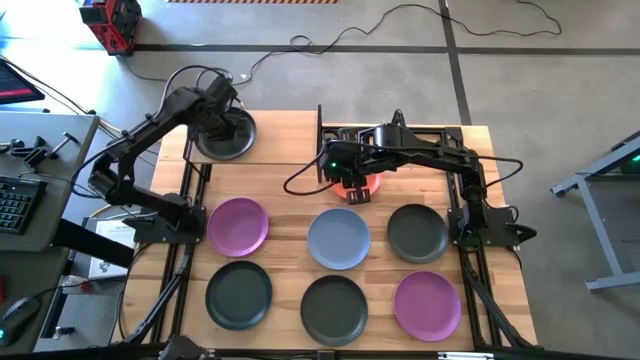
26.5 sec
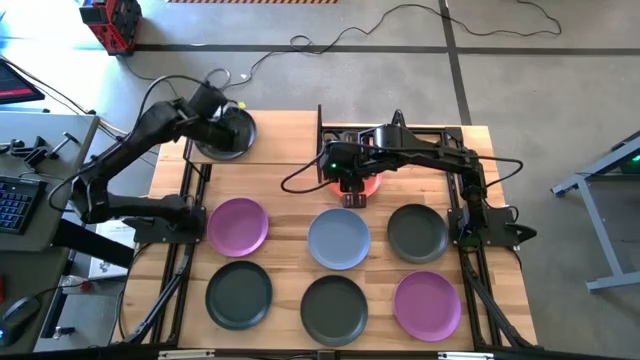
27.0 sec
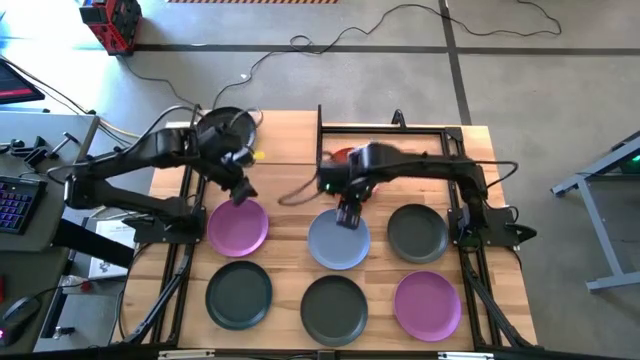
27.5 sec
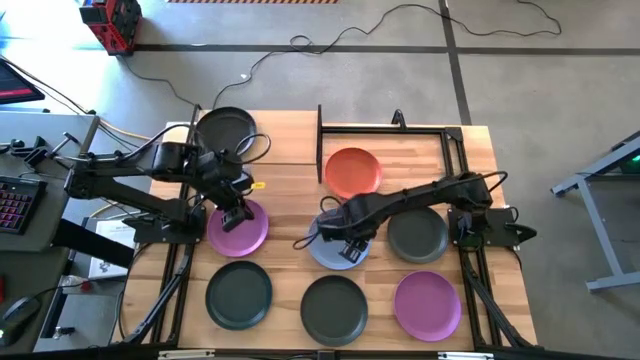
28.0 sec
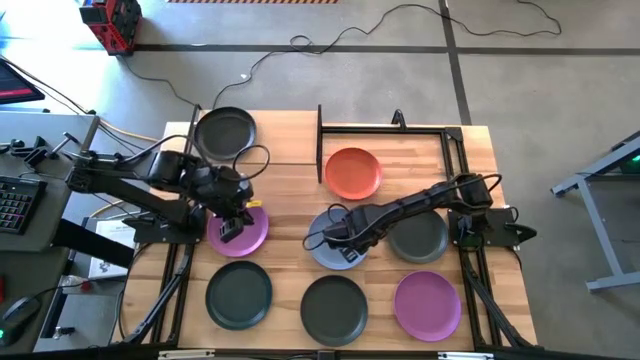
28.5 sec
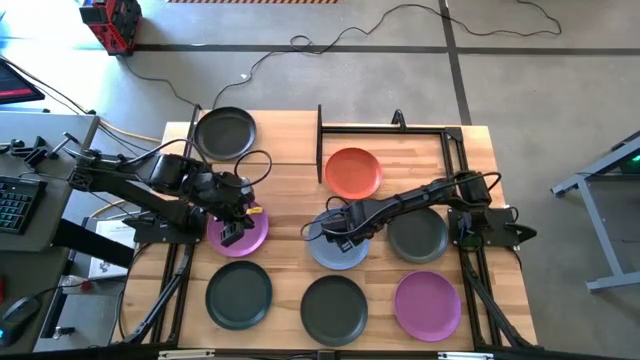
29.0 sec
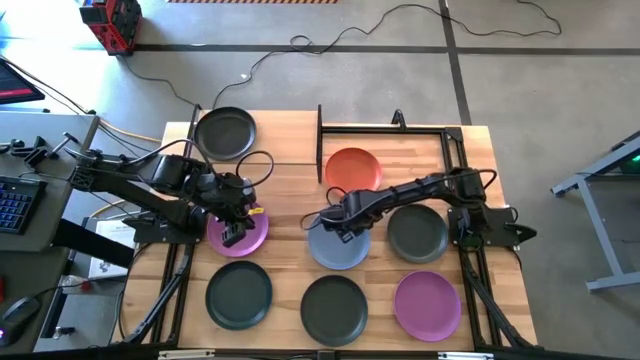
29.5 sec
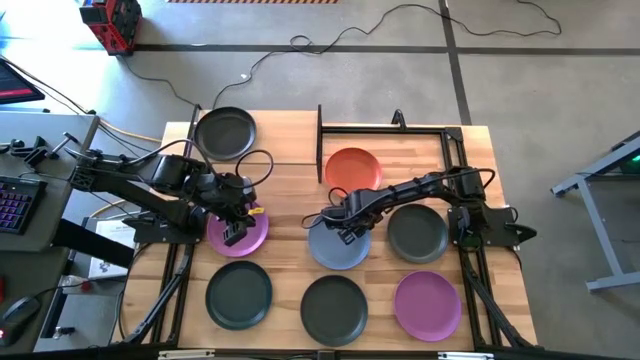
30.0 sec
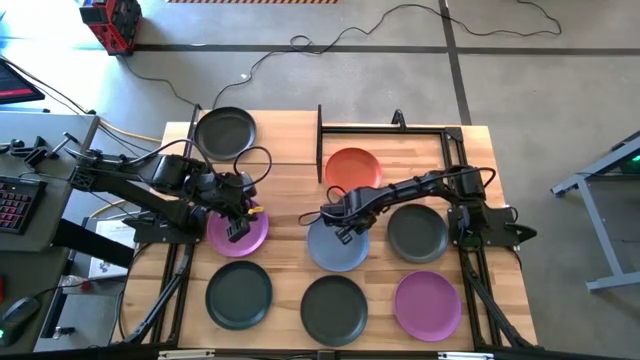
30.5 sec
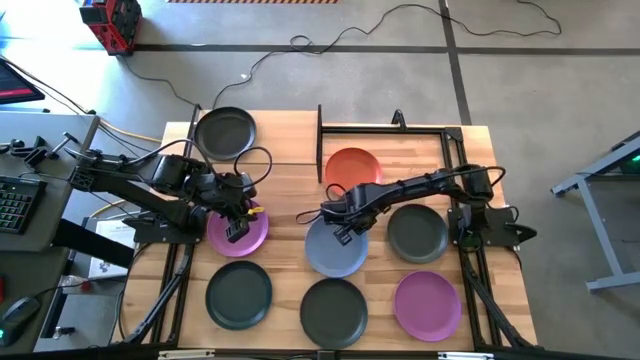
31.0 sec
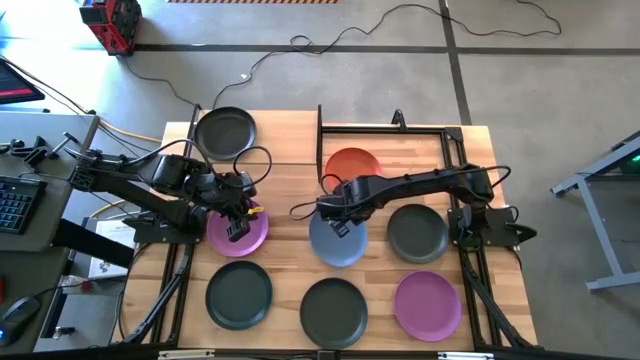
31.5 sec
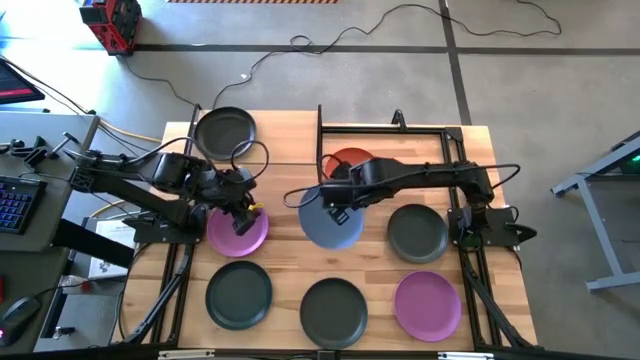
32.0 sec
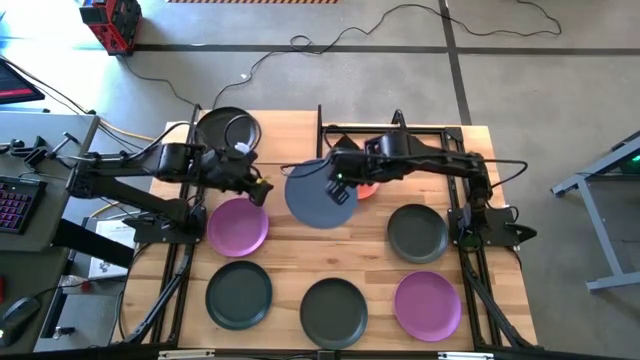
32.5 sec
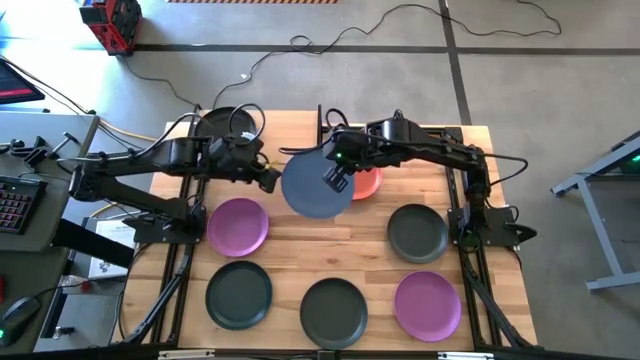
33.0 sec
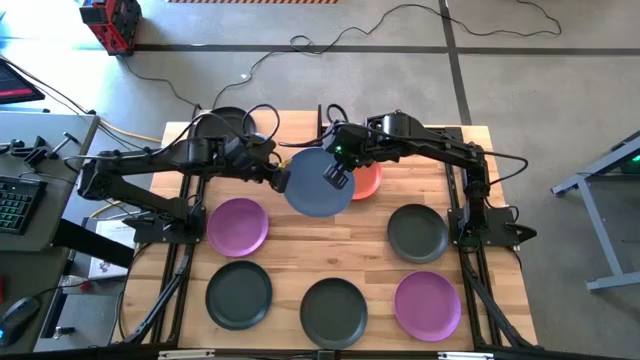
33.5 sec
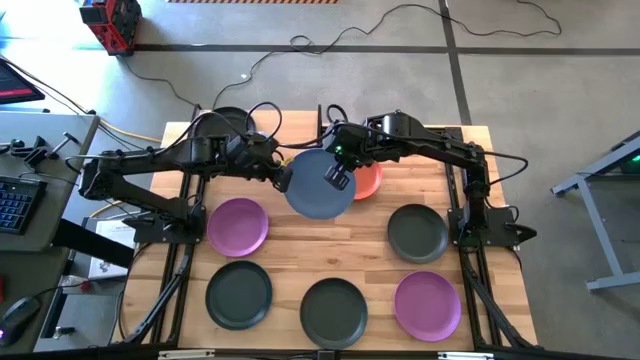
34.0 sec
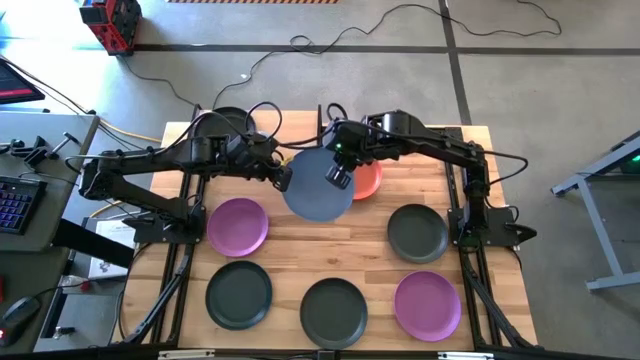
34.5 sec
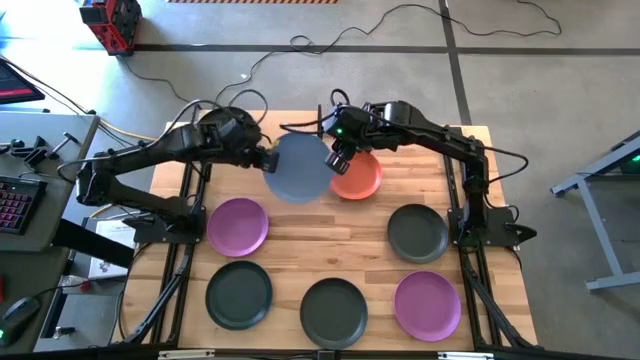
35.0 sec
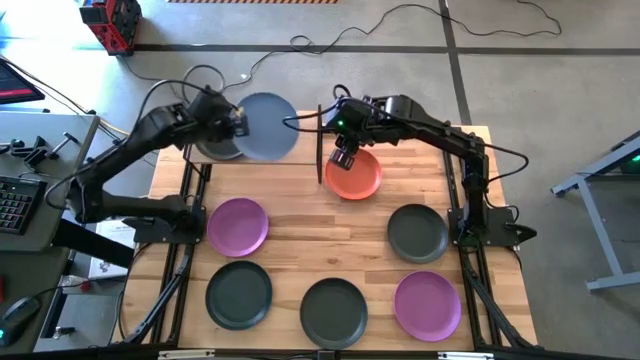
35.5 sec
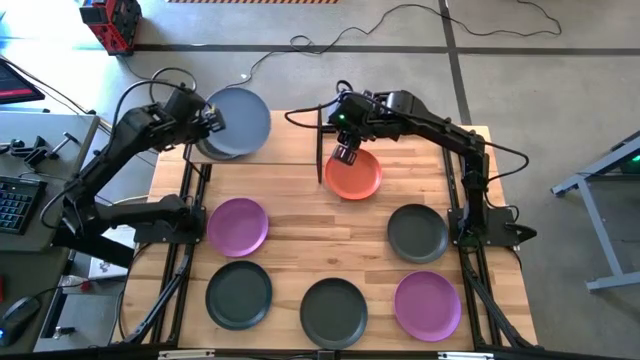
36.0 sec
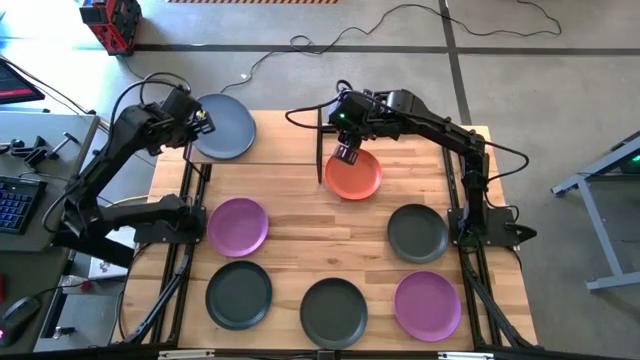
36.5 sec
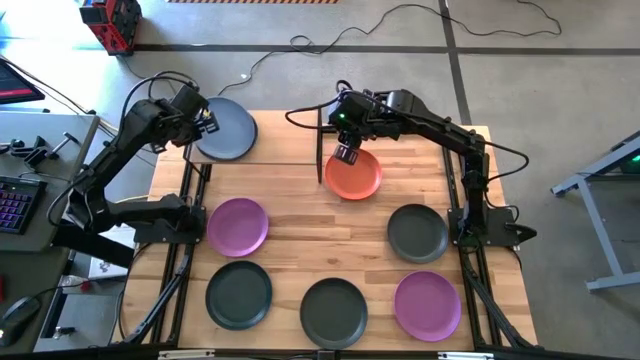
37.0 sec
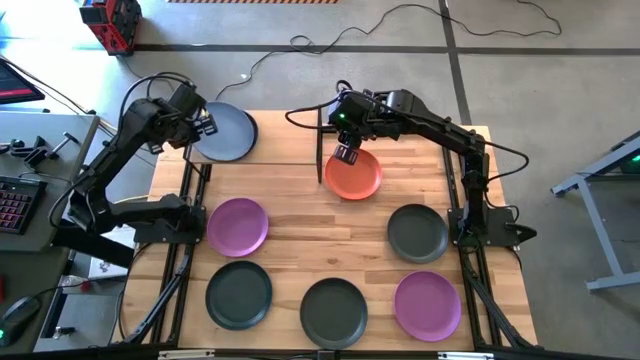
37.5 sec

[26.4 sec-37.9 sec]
Task: Place and stack plates onto a shelf
Stack the blue plate on top of the black plate on the shelf

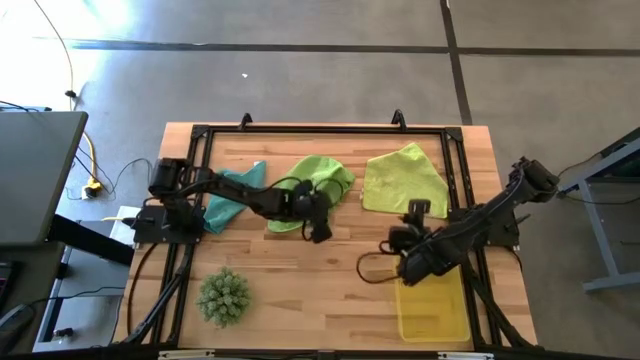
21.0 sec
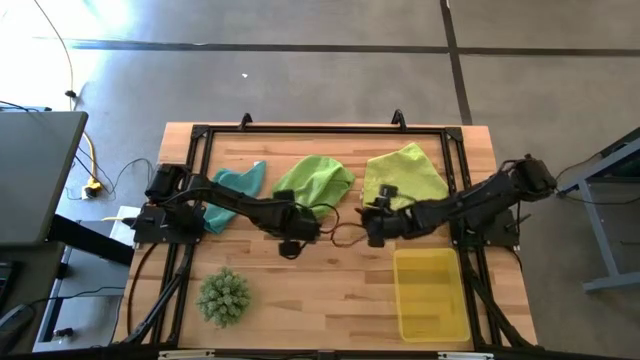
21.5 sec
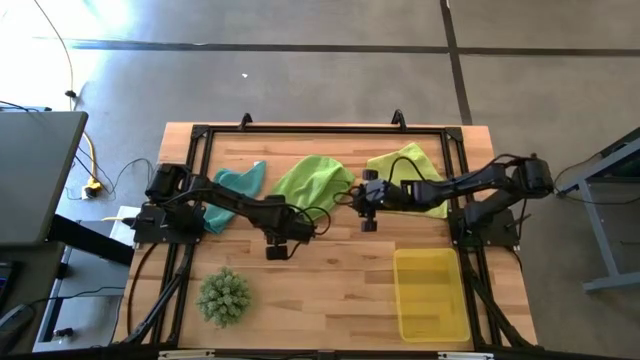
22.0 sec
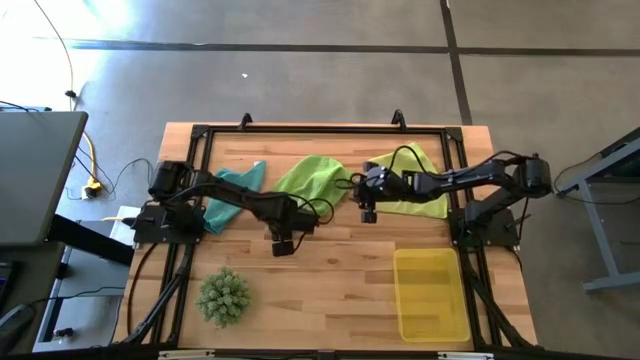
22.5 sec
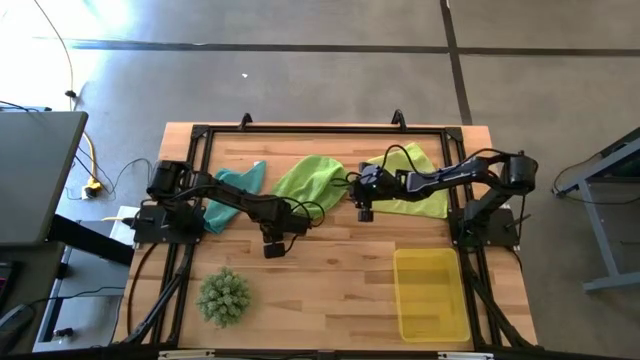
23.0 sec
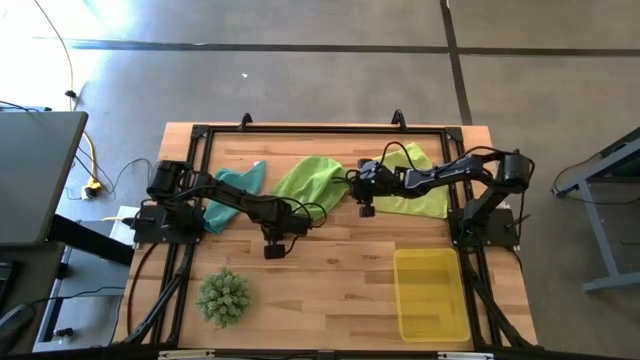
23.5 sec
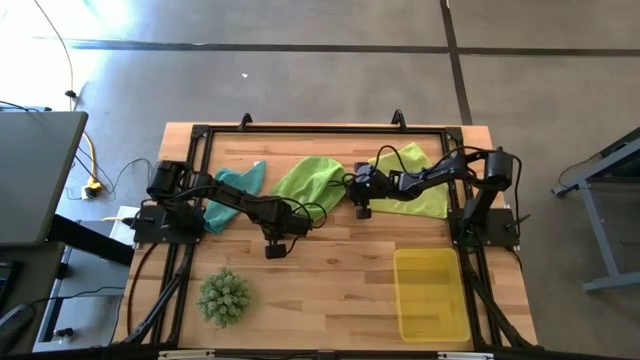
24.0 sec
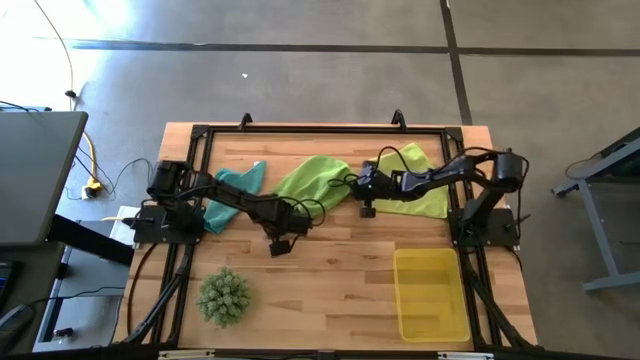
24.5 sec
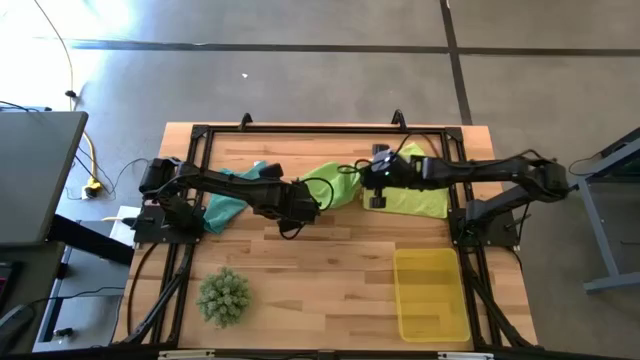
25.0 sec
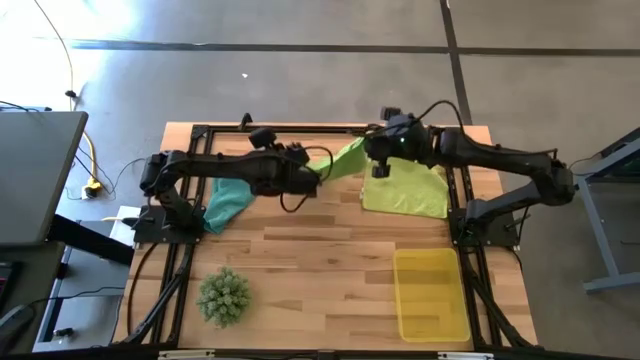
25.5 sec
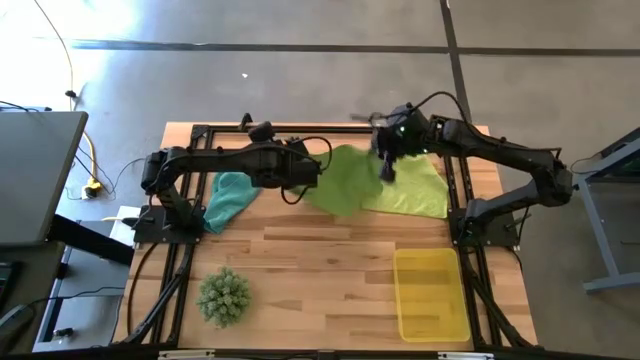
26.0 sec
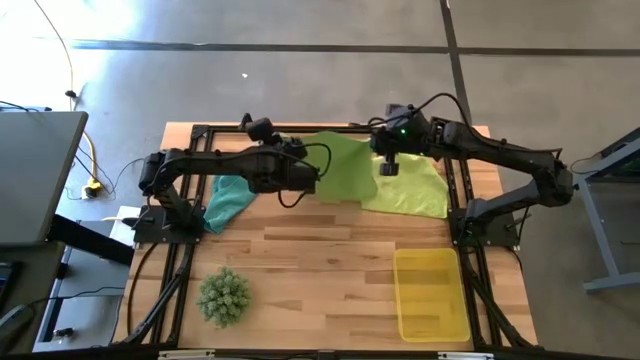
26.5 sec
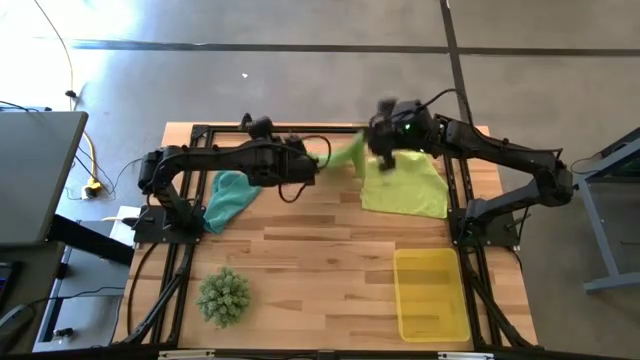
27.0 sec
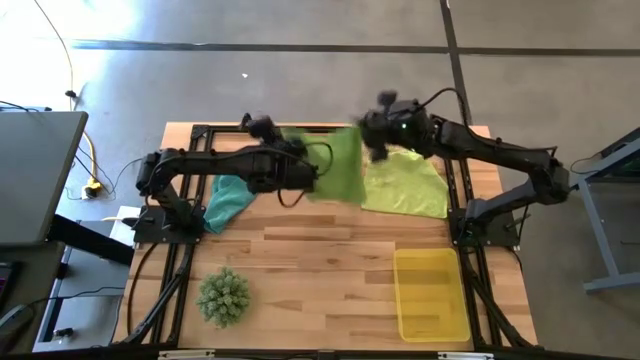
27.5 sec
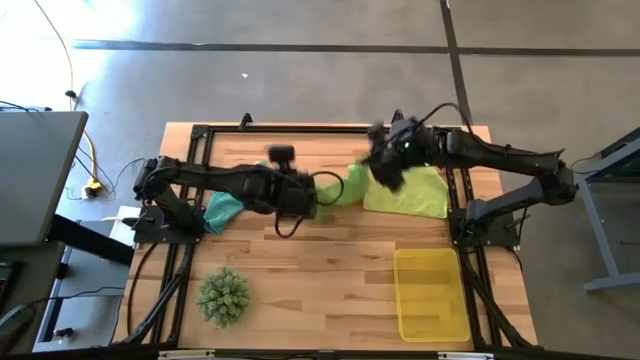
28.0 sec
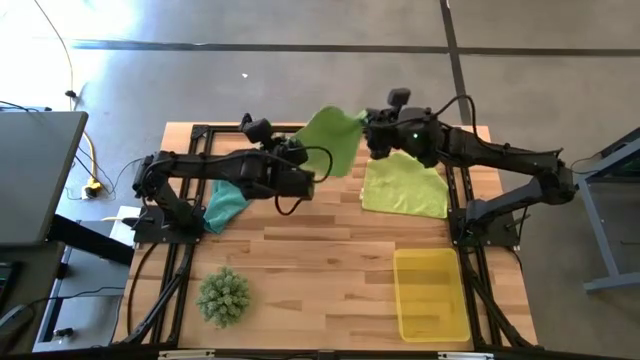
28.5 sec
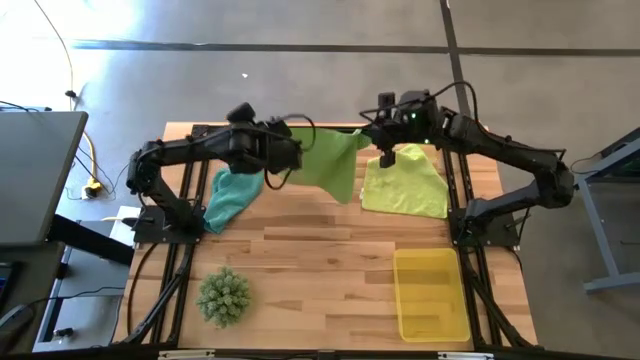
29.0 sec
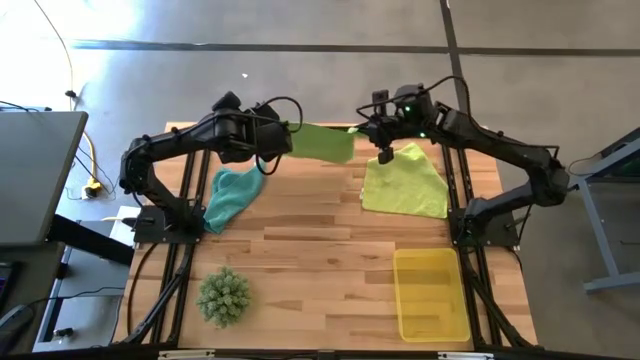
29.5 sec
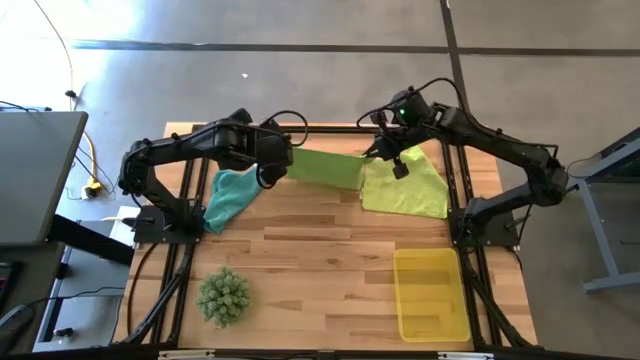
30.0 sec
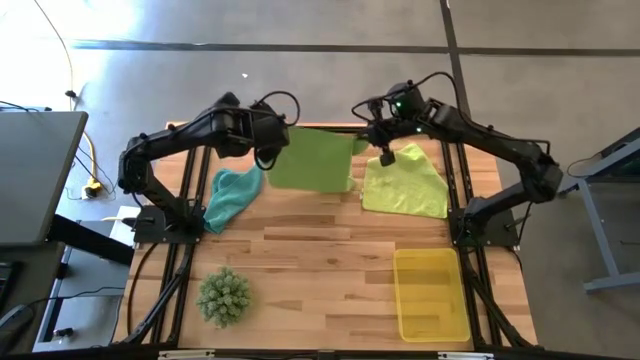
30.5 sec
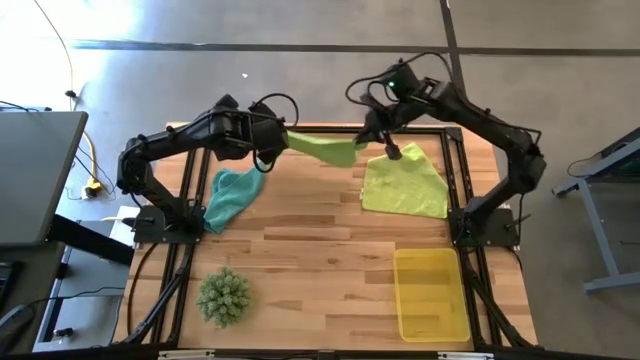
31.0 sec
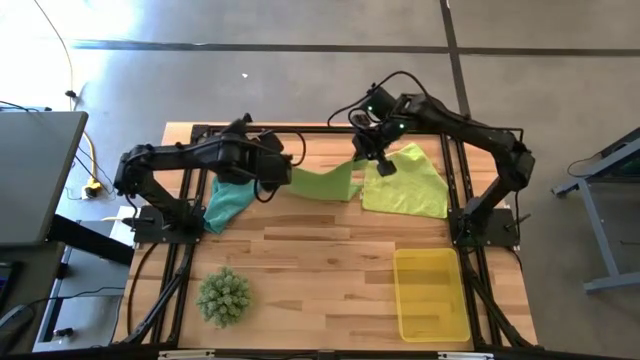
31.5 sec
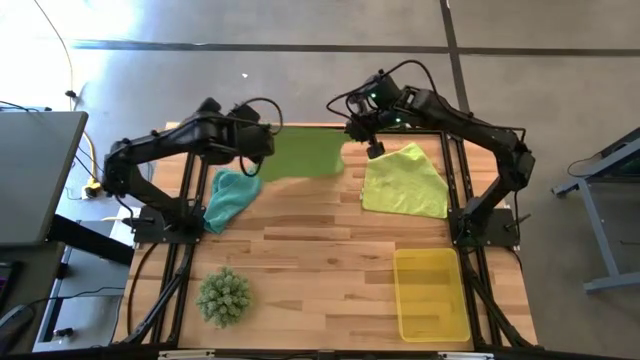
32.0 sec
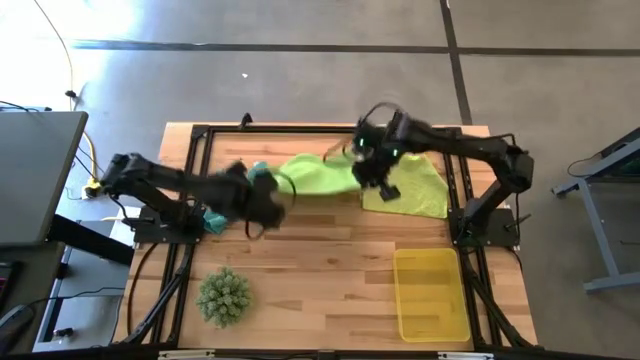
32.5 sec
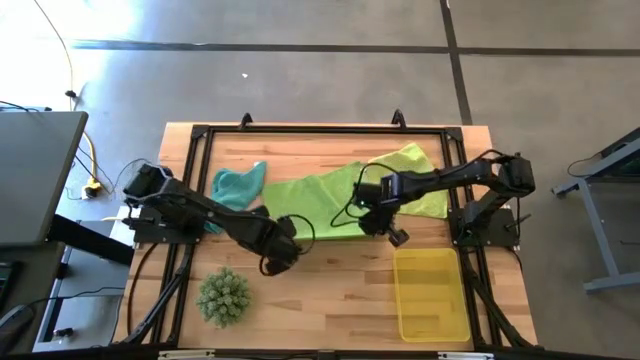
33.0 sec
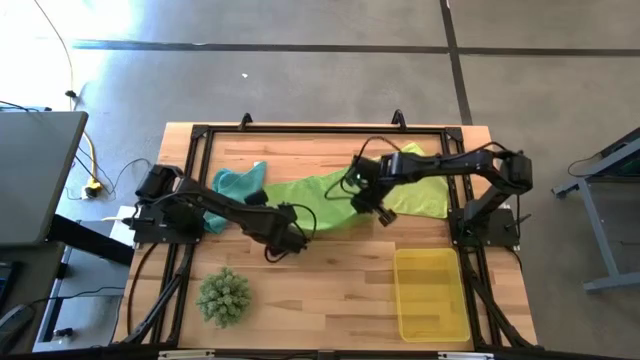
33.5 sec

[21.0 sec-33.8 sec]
Task: Roll microfiber towels into tight, uniform cylinder then place into a basket
Fold the green microfiber cloth
